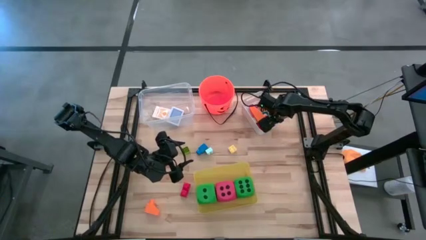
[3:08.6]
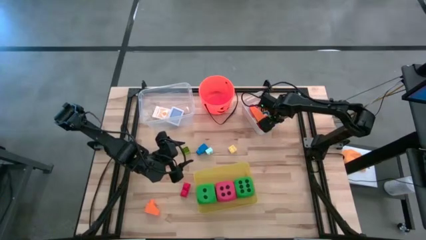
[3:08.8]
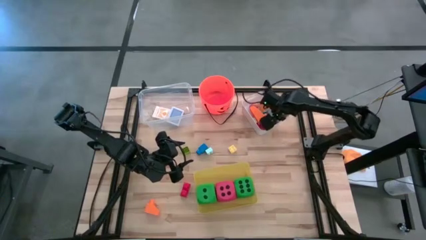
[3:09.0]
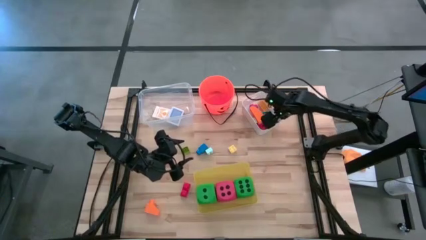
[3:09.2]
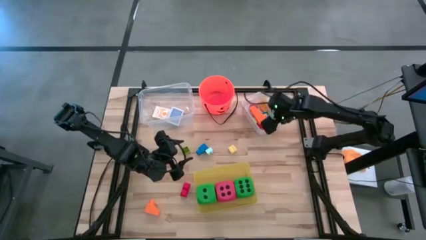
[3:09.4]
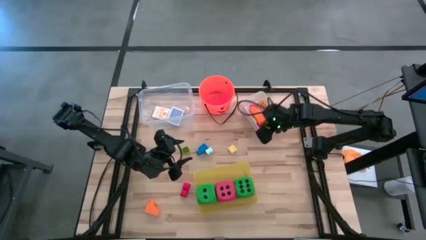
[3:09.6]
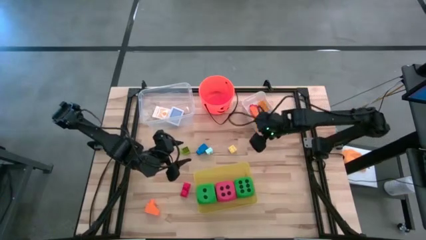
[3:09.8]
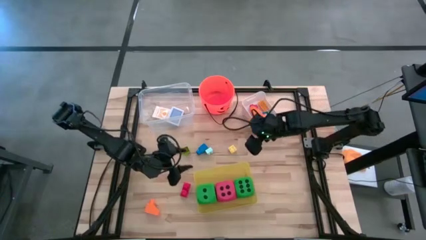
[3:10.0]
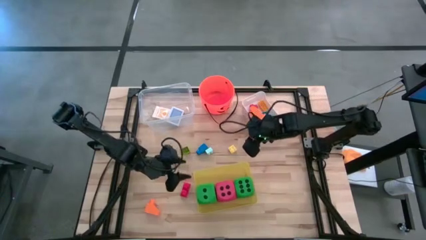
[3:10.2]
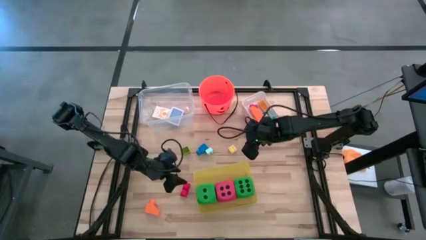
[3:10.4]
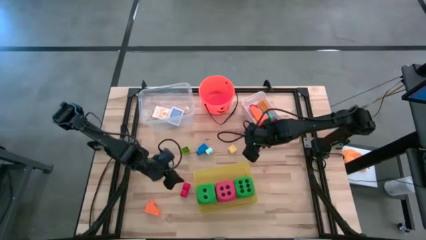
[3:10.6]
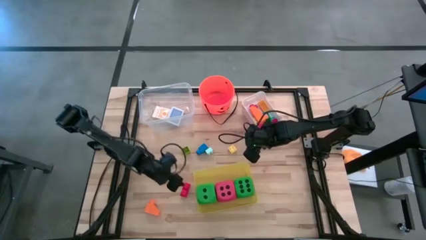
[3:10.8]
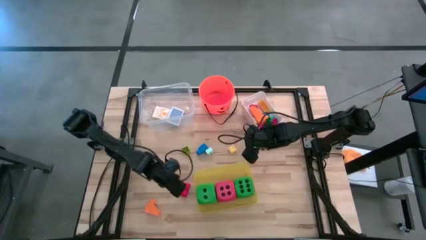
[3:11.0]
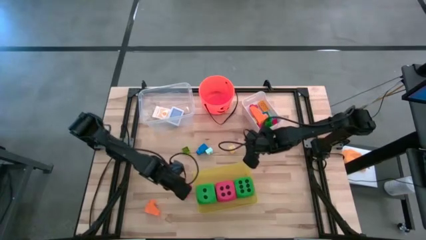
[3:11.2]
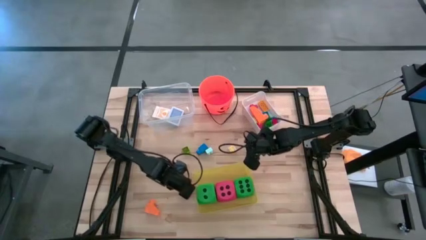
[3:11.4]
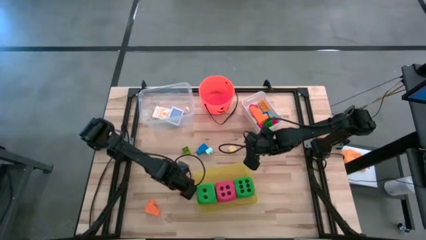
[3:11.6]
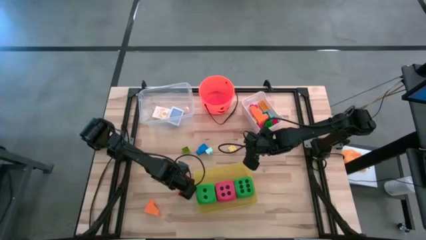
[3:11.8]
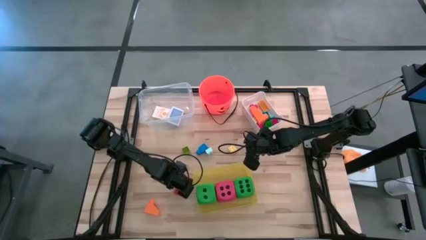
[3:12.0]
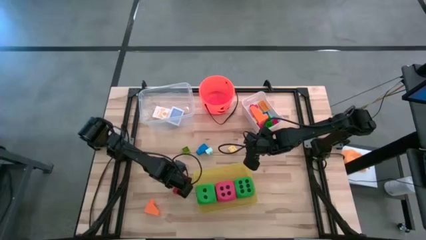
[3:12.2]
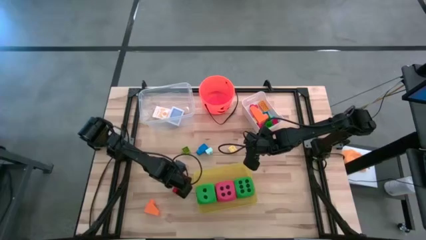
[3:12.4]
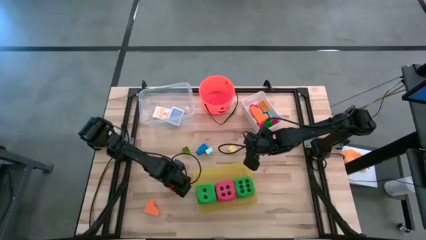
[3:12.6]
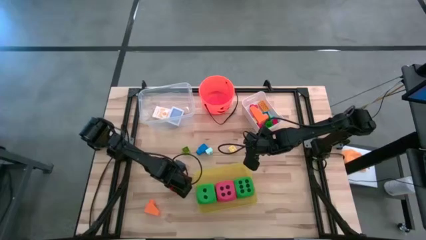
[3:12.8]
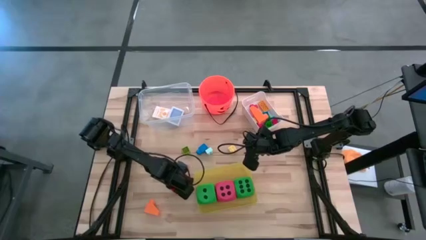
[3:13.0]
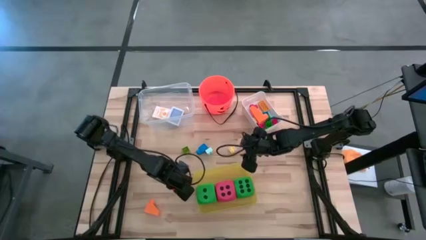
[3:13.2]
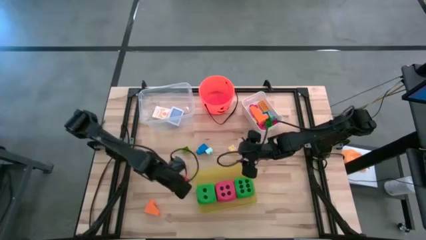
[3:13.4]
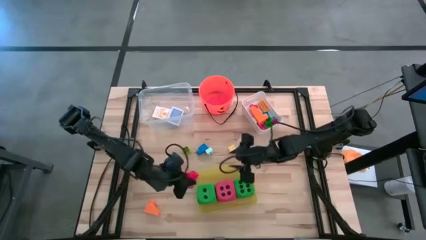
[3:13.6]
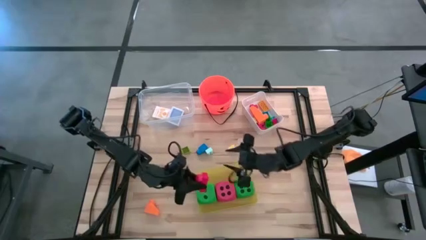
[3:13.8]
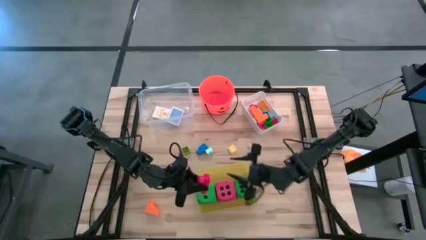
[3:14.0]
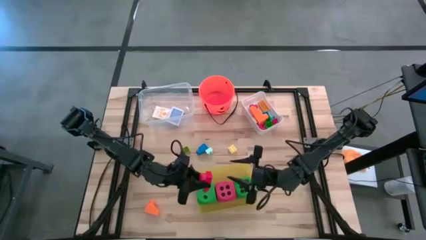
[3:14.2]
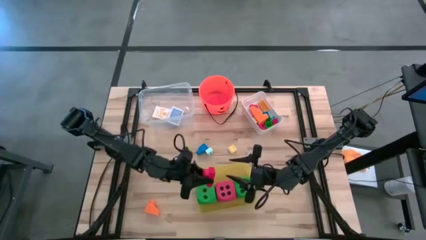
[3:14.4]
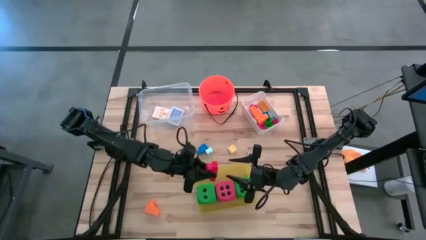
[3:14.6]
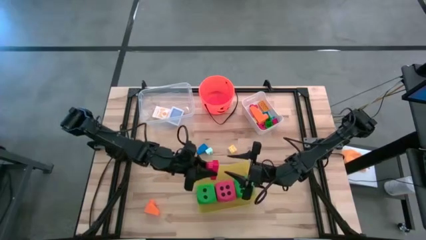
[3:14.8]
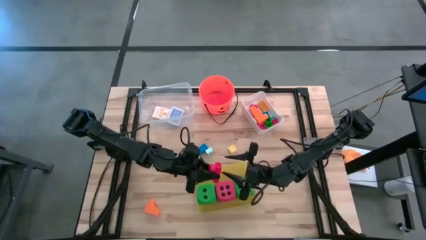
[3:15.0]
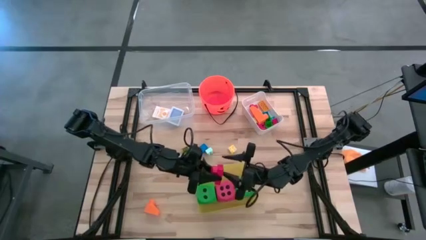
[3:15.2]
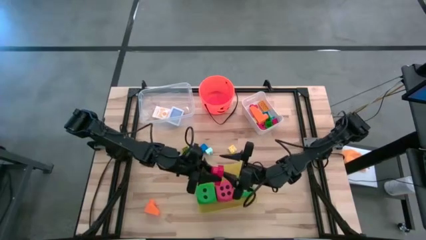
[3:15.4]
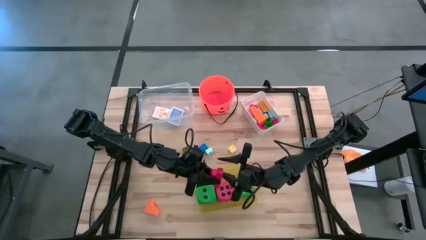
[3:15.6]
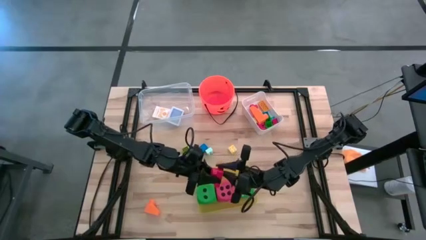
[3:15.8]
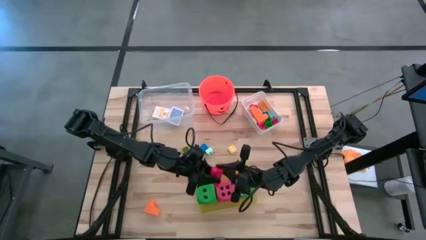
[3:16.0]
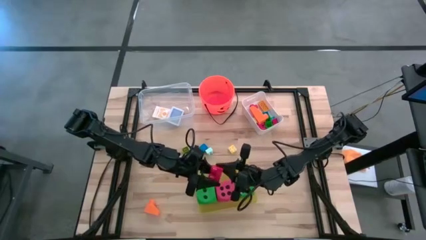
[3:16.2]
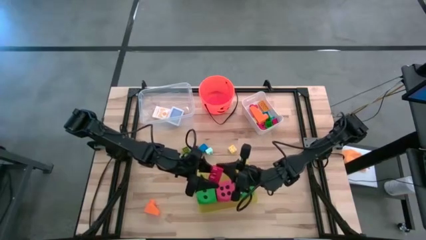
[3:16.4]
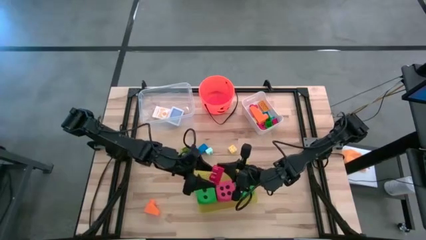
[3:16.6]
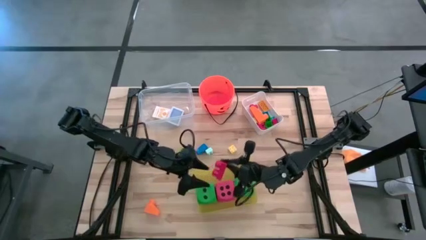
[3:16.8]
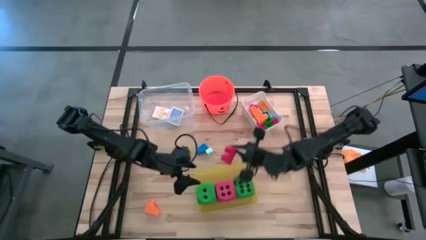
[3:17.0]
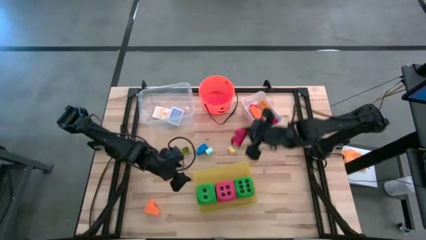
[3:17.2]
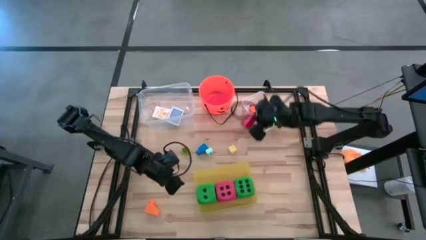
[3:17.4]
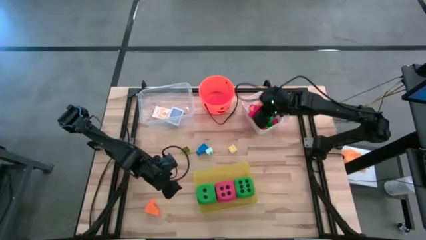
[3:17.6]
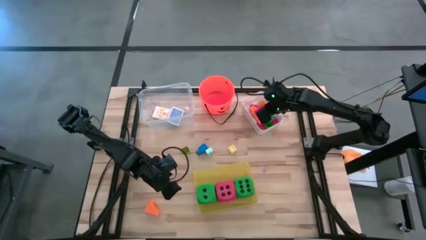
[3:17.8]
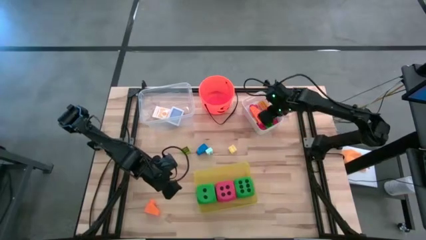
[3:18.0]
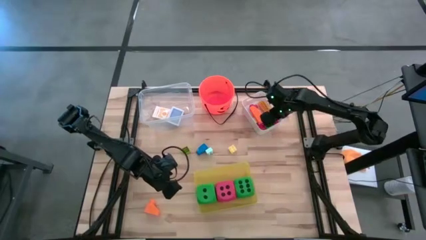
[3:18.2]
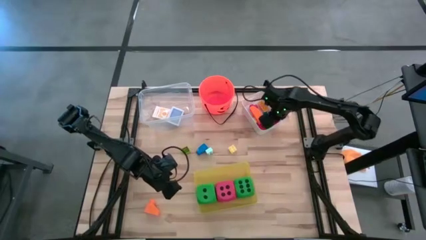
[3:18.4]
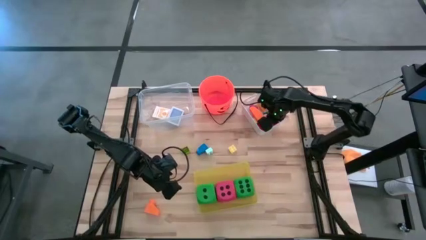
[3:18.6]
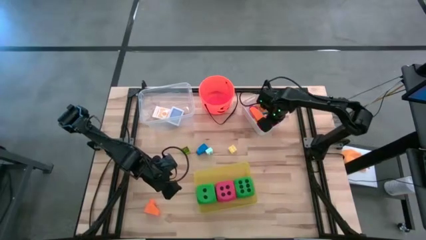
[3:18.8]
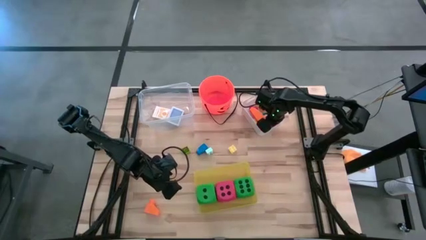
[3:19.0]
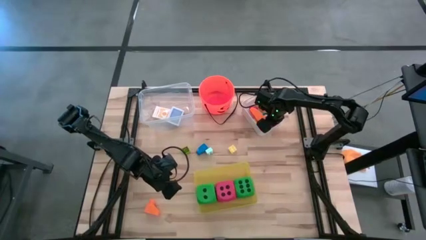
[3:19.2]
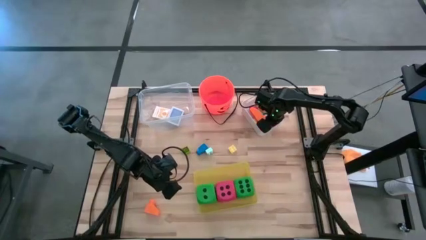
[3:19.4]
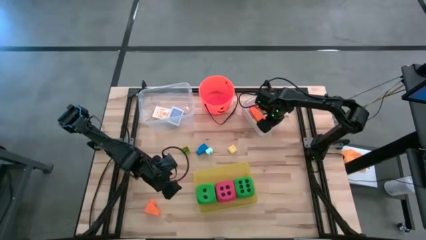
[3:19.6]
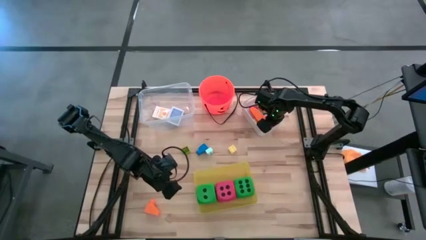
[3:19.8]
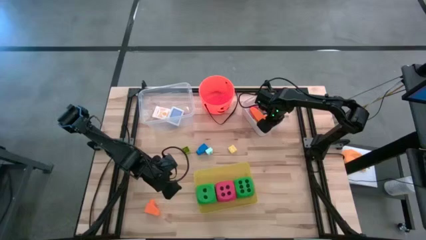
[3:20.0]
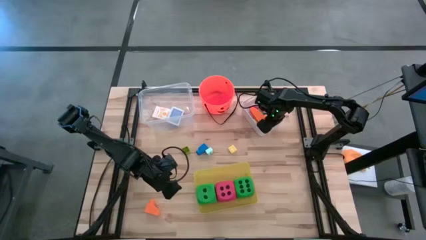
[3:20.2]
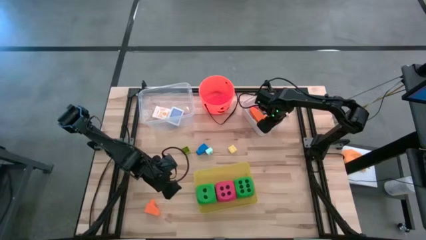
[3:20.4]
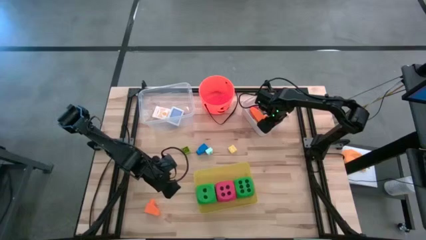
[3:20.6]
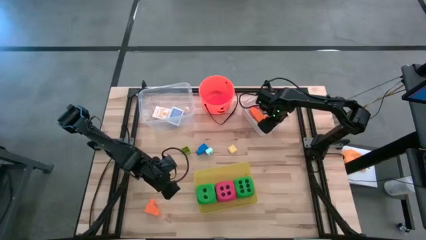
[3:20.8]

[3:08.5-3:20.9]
Task: Pick & Place Toys
Put the red game piece into the white bin

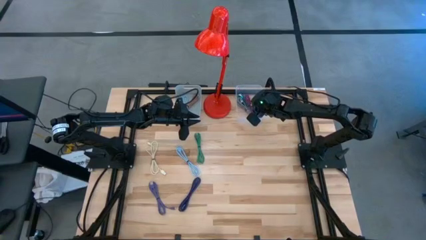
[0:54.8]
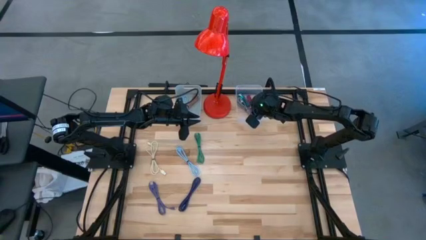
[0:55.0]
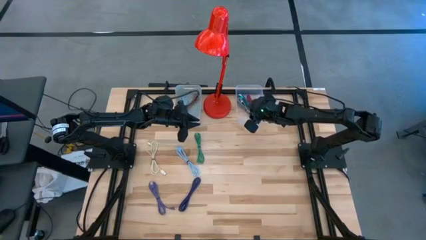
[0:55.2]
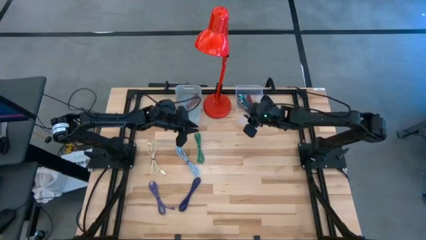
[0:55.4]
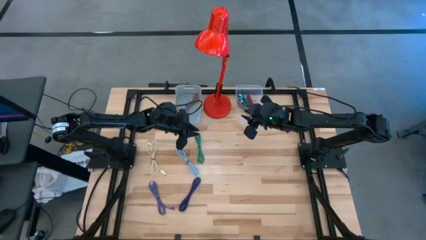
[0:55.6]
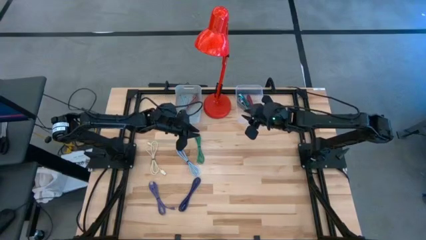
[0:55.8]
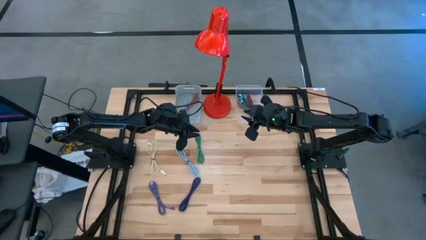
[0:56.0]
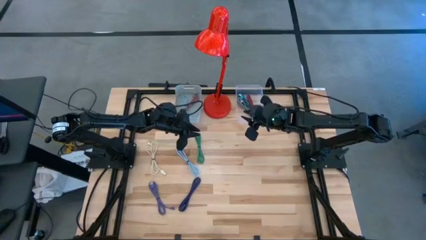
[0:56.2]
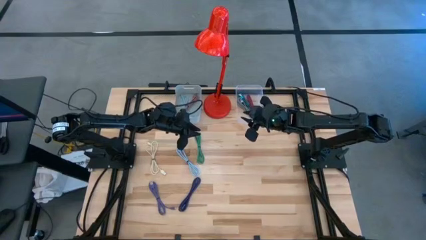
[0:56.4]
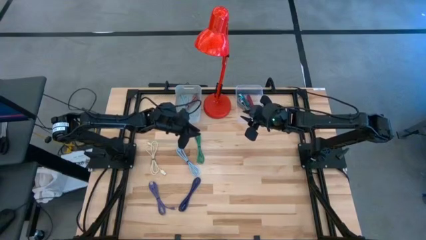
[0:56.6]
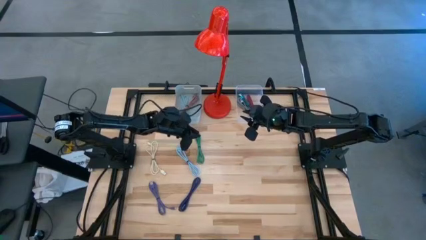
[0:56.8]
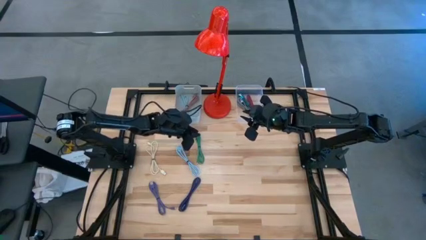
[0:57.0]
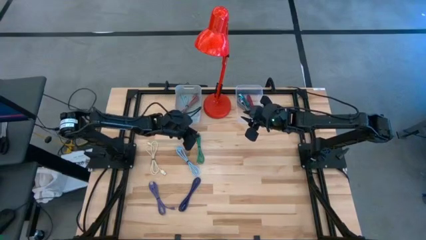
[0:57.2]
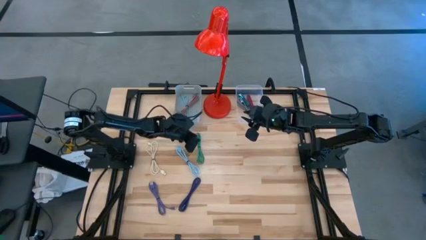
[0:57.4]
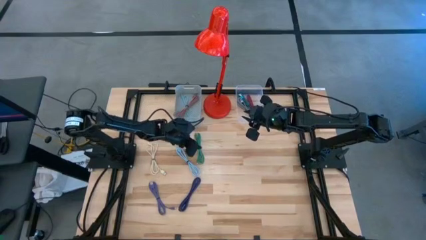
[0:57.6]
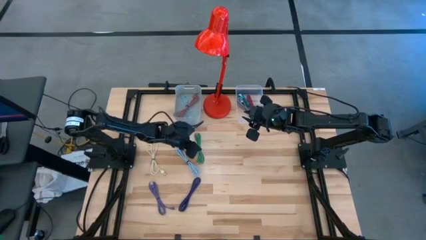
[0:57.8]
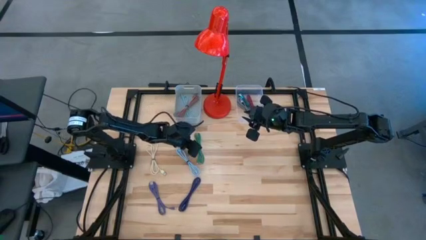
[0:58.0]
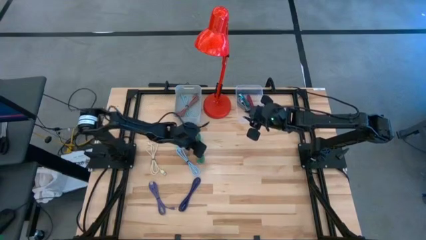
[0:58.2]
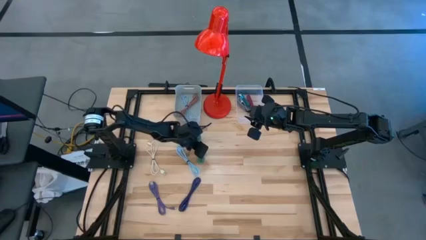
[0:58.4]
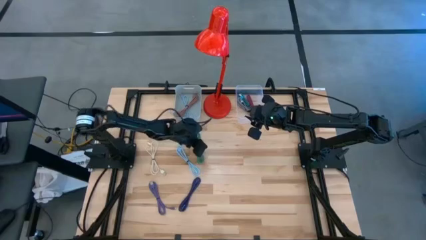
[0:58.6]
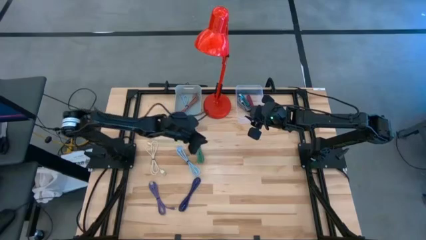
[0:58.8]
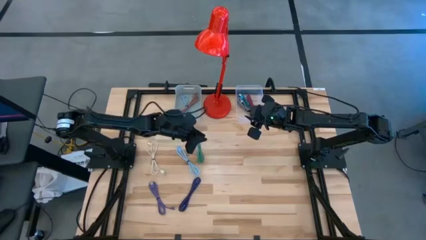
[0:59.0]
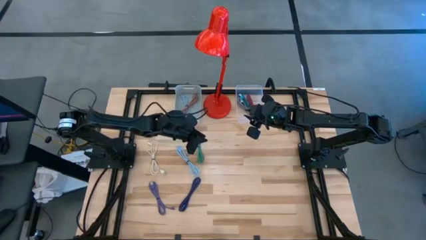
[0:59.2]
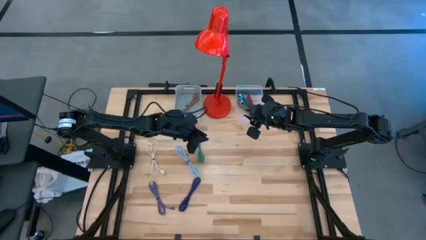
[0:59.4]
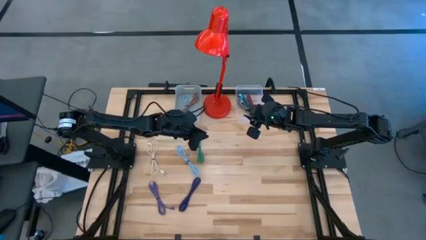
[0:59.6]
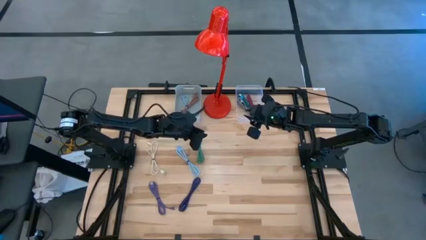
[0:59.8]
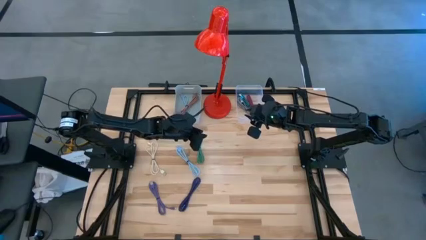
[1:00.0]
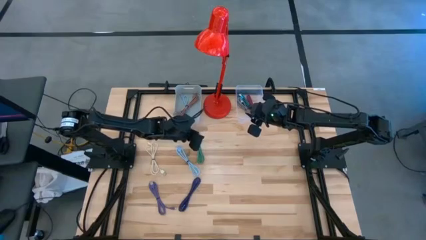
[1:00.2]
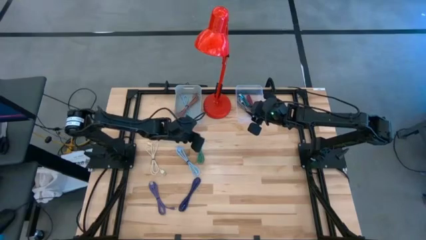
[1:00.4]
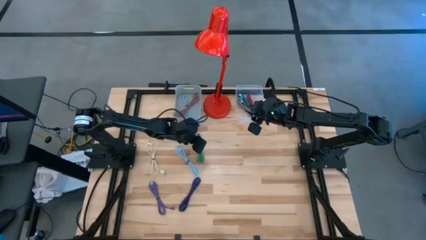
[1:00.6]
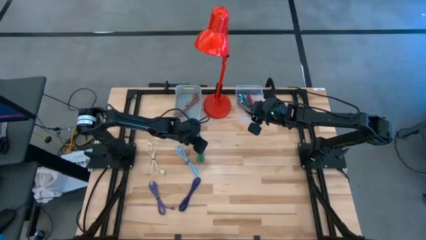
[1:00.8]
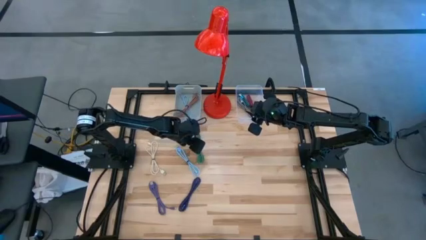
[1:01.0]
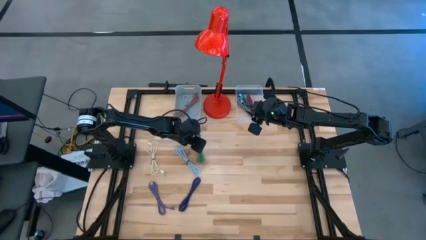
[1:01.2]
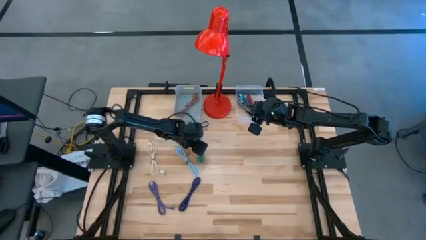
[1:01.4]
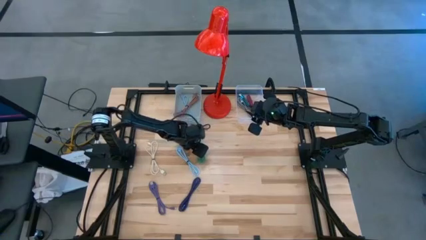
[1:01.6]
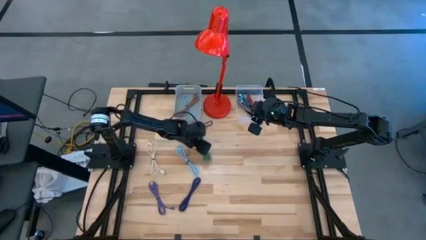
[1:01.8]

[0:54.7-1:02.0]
Task: Pick & Place USB Port
Put the green charger cable into the gray bin
